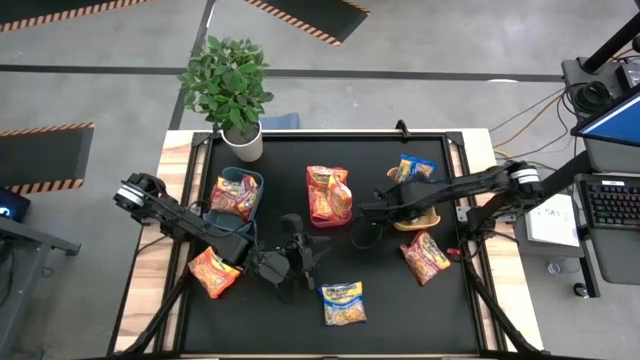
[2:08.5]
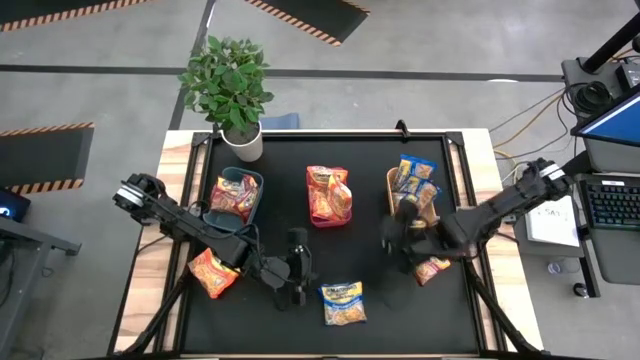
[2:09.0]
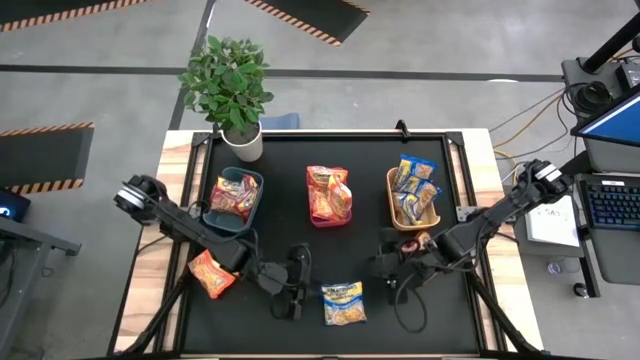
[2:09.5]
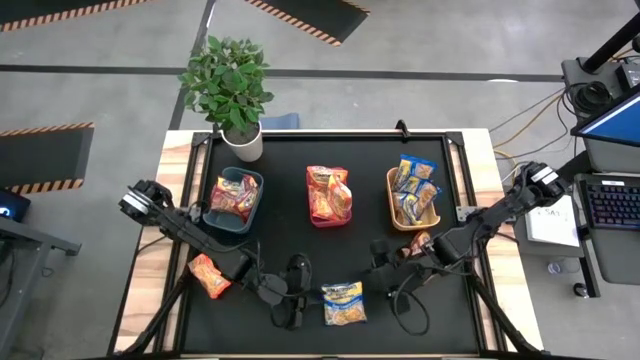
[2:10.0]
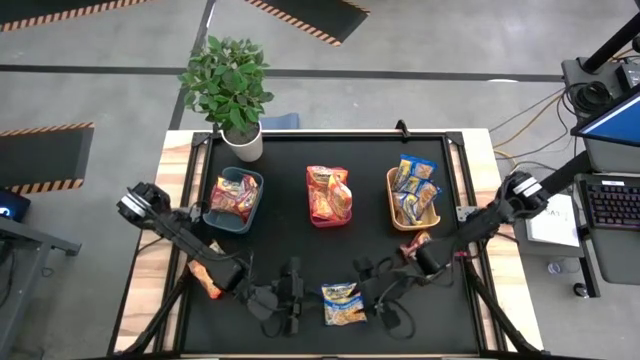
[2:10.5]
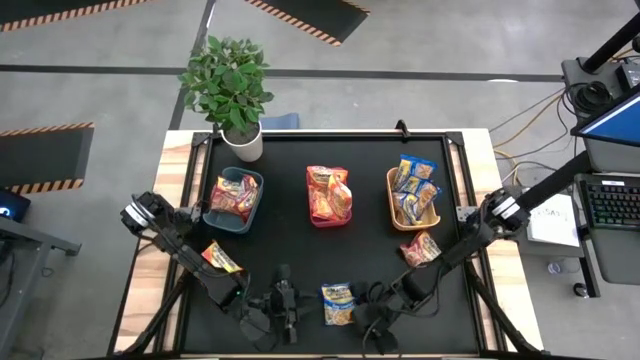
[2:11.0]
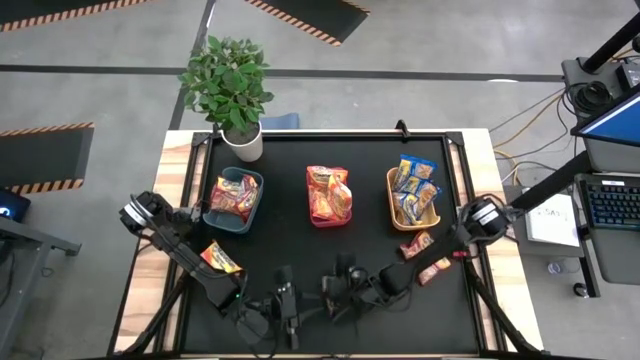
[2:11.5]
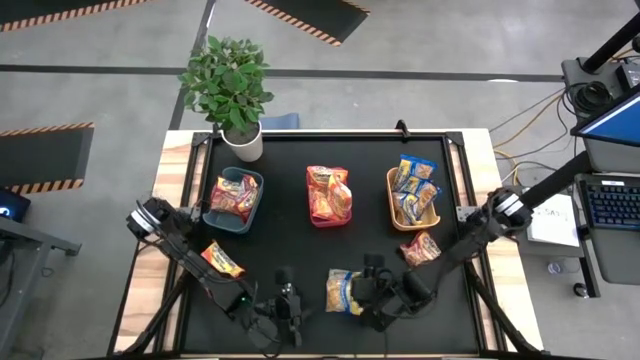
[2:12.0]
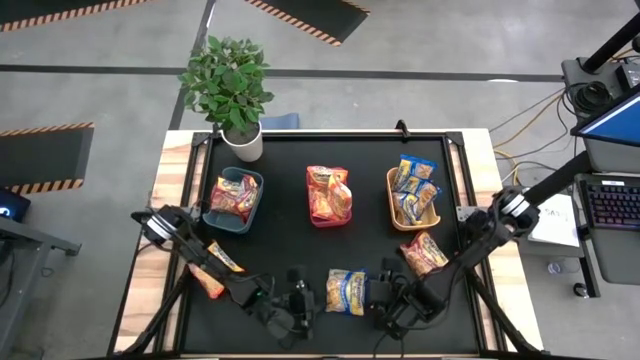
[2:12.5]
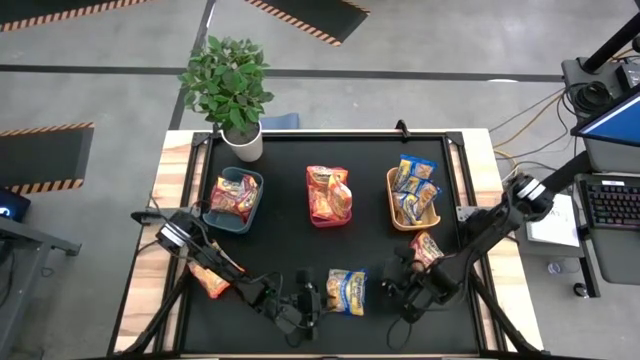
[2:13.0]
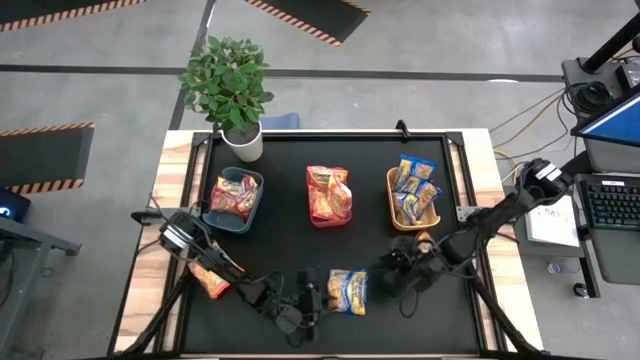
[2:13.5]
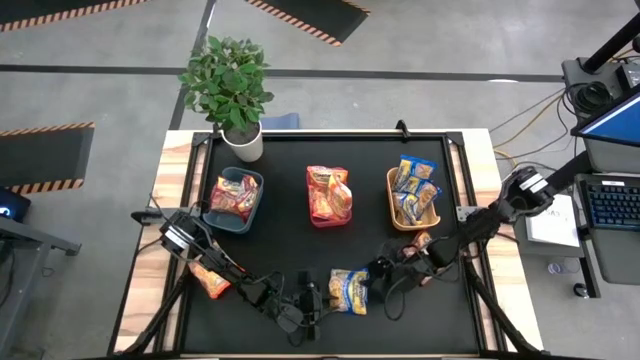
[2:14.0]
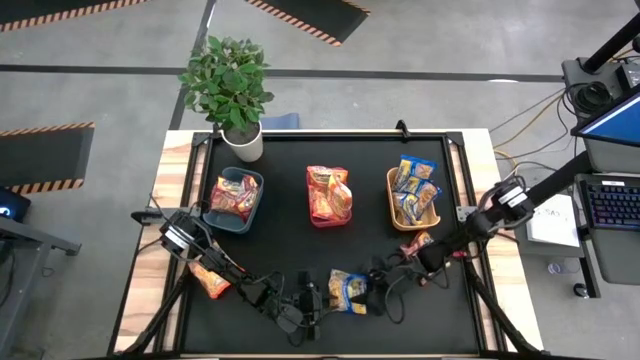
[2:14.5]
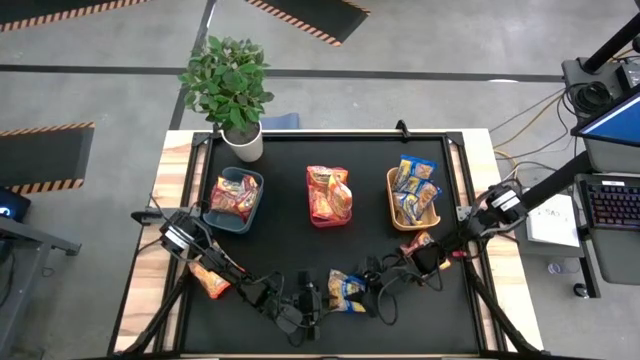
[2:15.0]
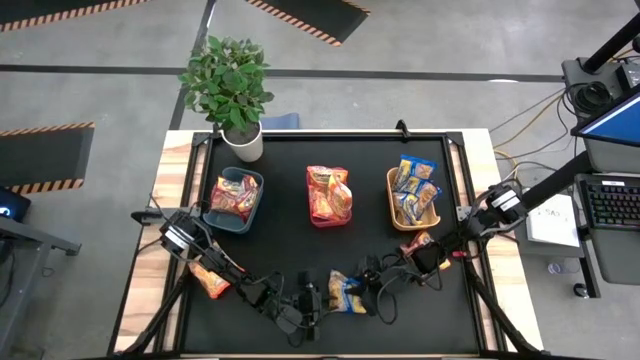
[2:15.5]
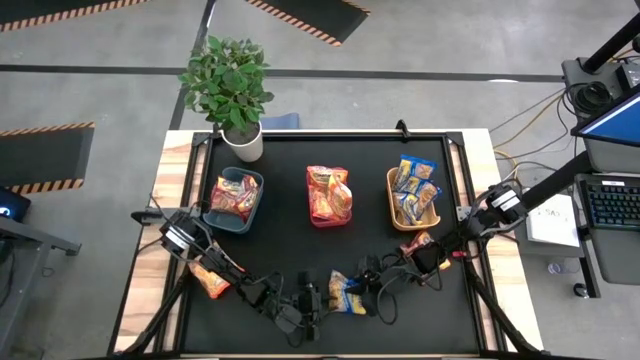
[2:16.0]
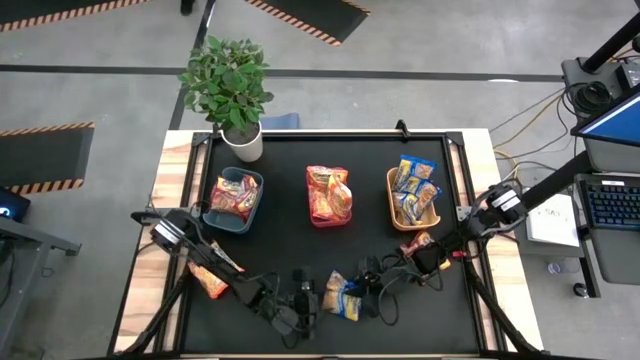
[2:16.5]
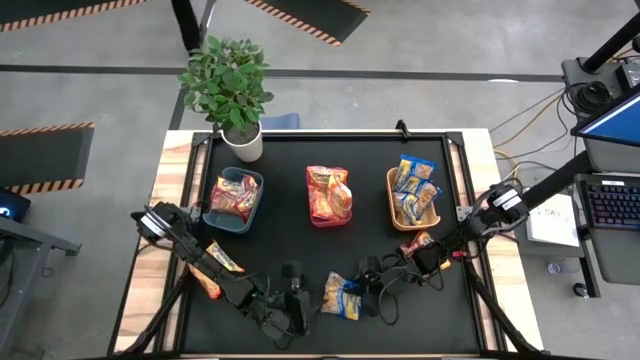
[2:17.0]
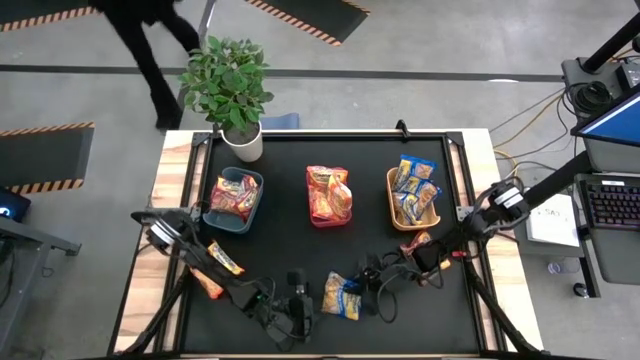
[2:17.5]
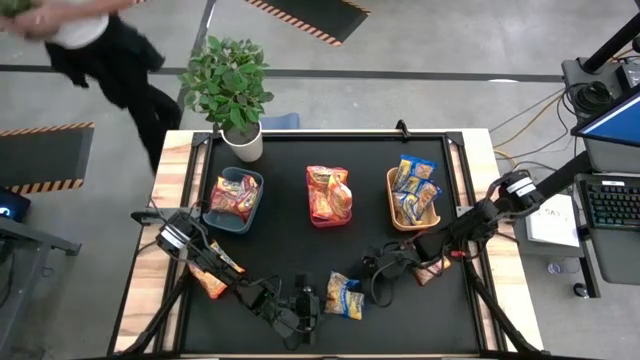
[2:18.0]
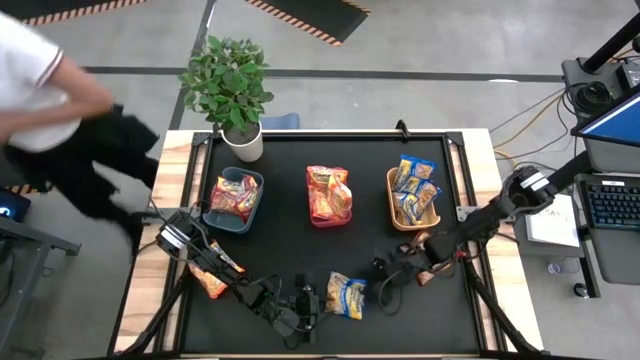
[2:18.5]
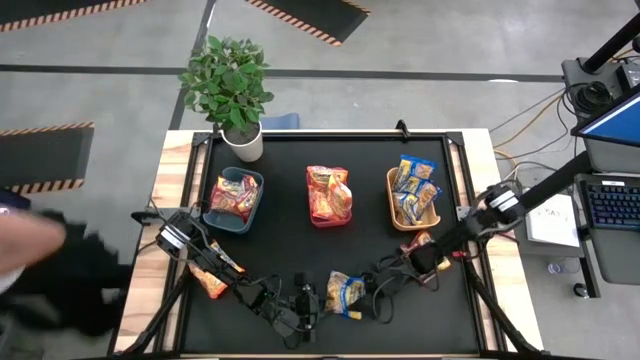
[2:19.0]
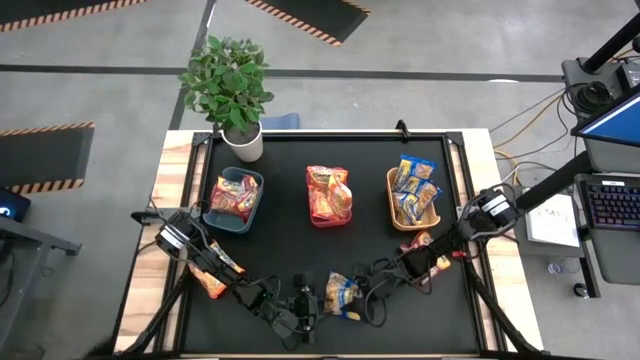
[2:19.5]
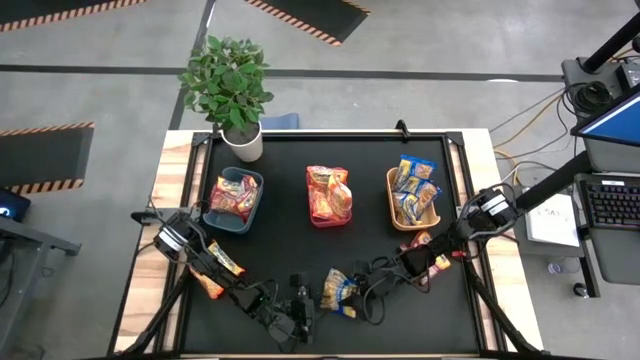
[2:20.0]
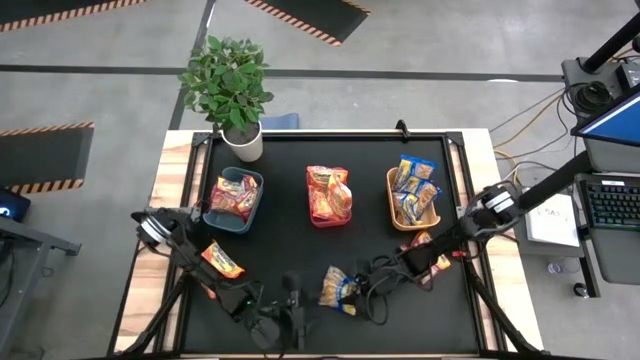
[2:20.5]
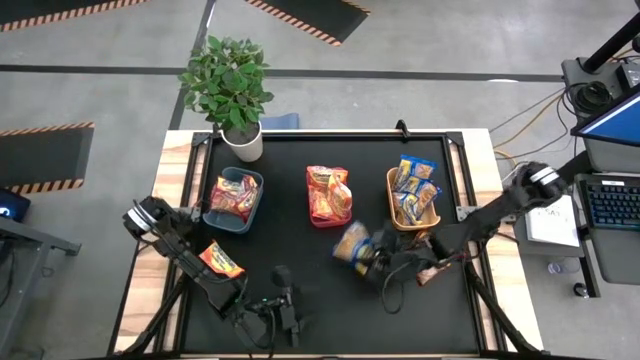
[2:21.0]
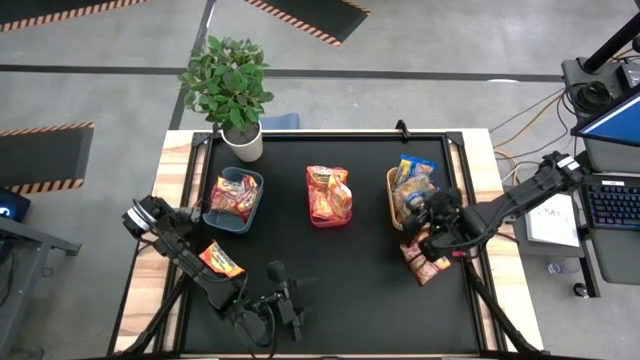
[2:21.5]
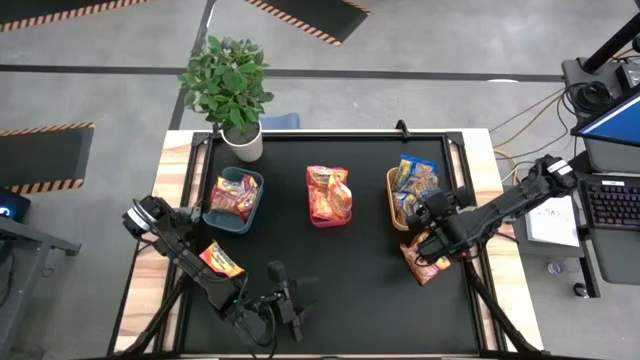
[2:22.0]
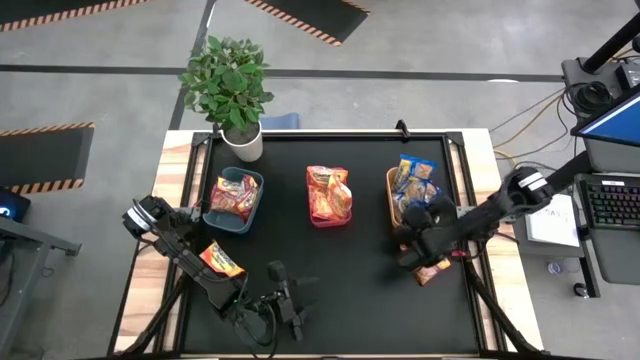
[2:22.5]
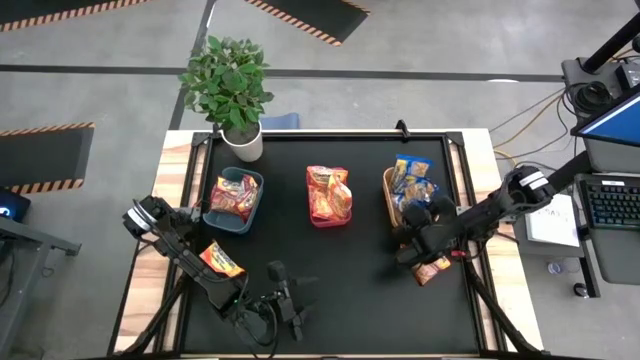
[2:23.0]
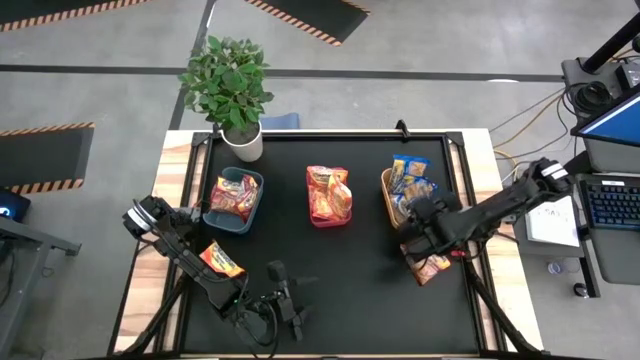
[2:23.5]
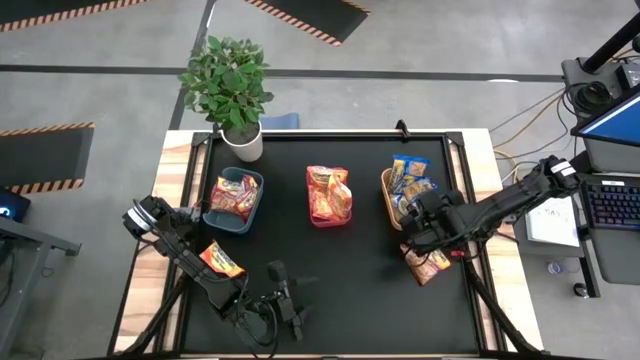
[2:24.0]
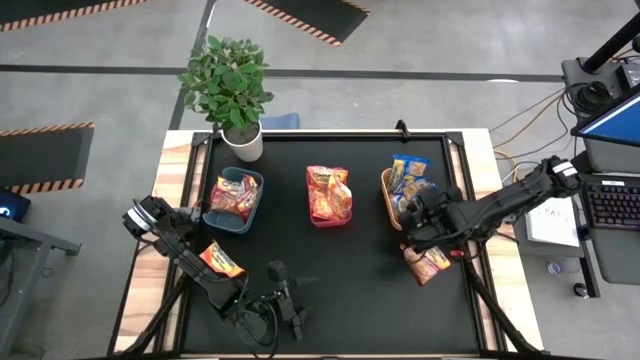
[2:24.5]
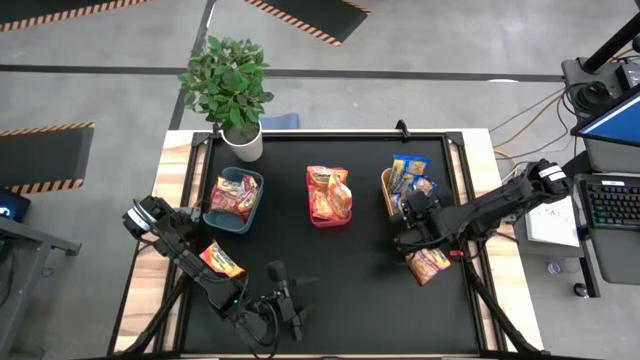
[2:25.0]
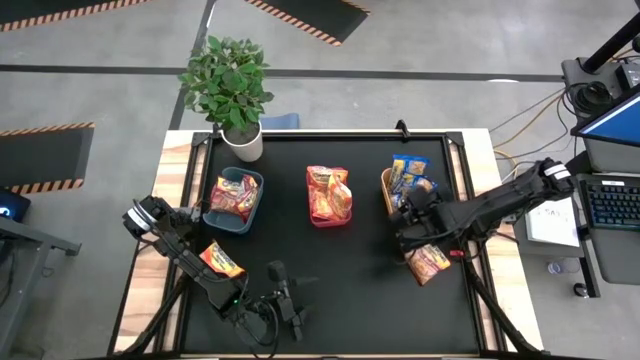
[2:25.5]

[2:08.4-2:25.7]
Task: Sort Maruchan noodles
Put the blue noodle pack into the yellow bin

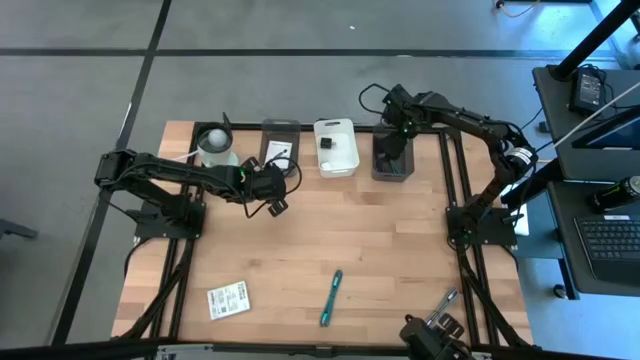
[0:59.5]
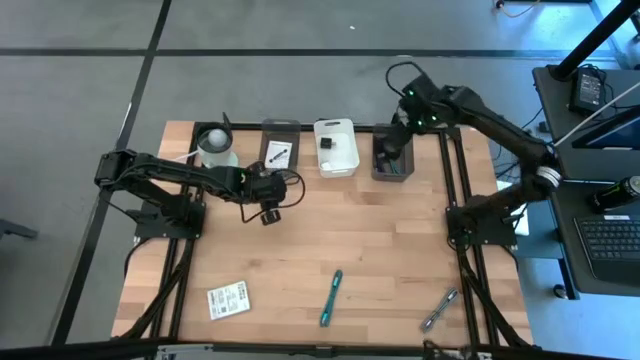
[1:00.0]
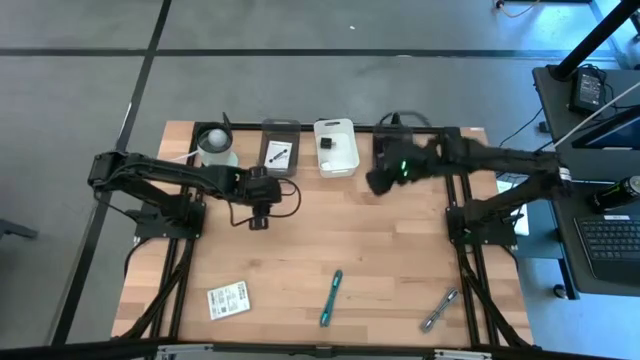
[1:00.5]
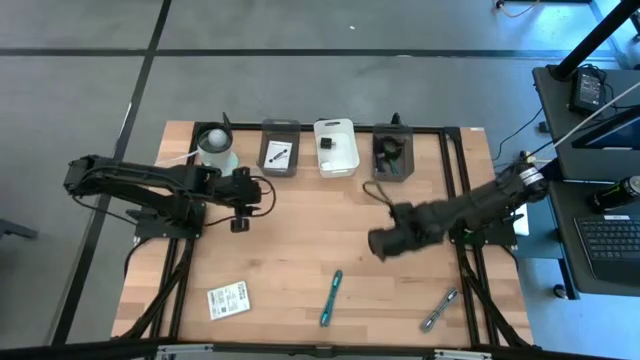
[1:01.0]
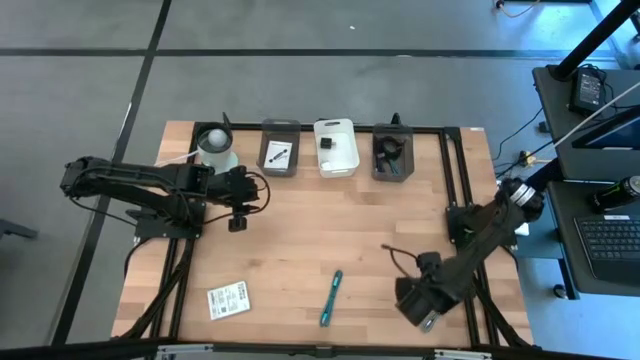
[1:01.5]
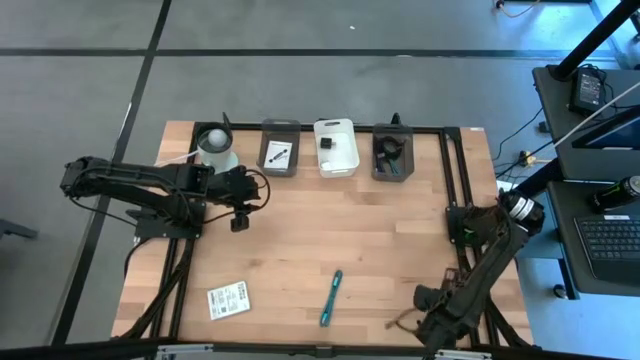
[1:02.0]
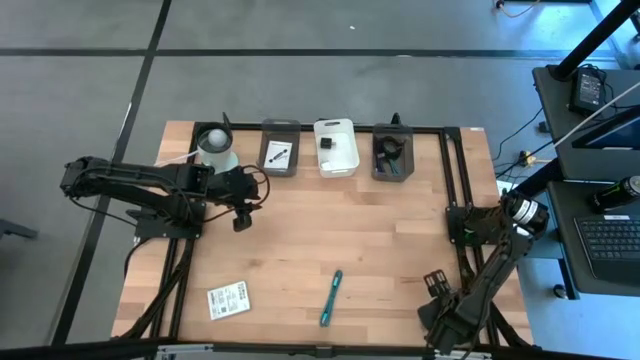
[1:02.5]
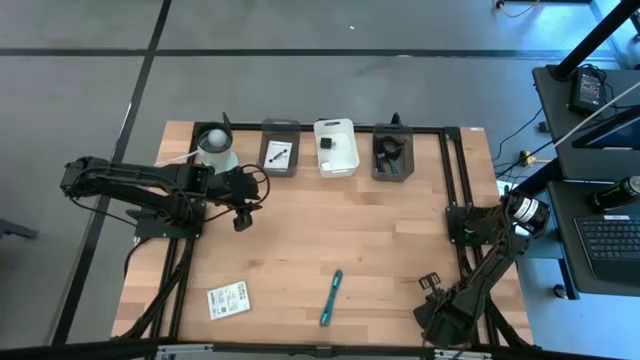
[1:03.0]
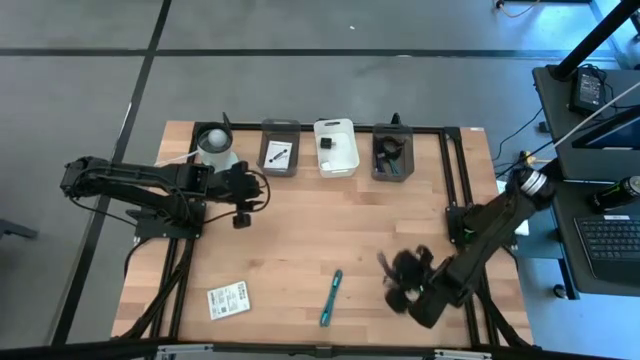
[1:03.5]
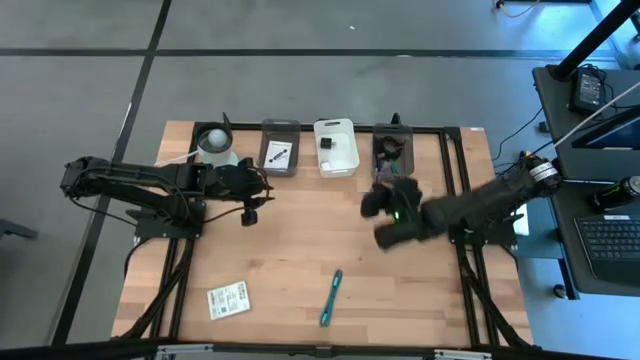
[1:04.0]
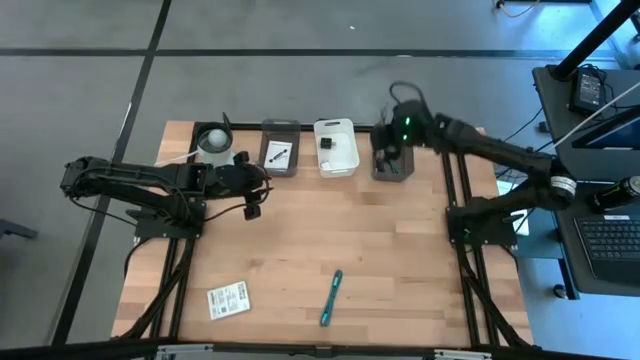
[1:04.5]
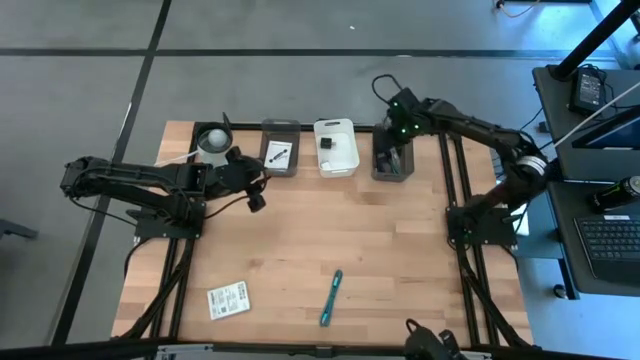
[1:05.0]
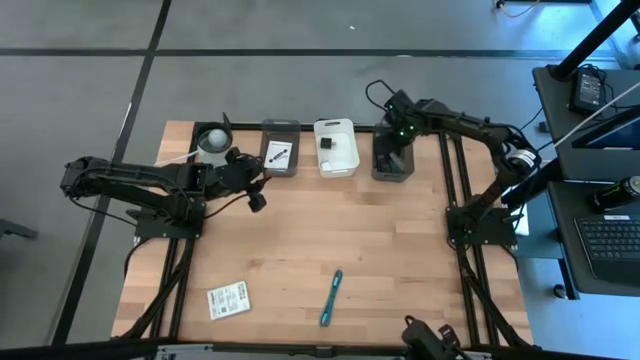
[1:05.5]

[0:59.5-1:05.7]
Task: Pick and place items into bin
Put the gray charger cable into the right black bin
